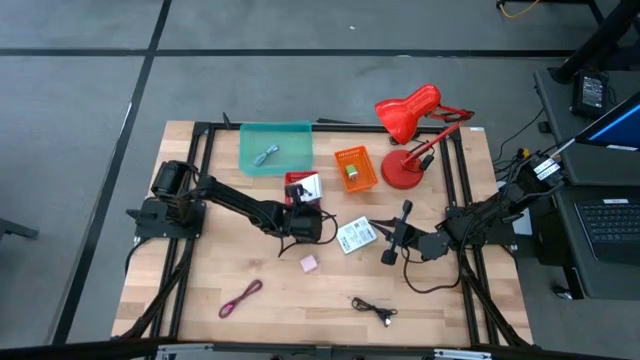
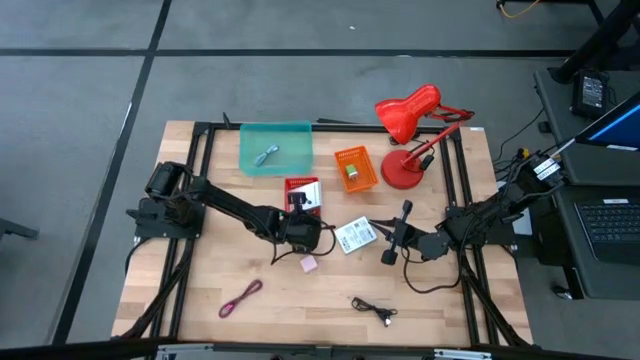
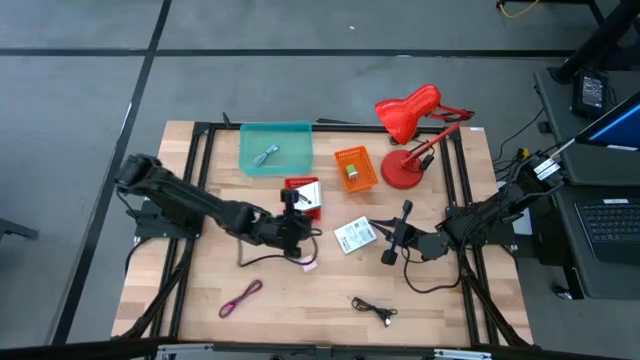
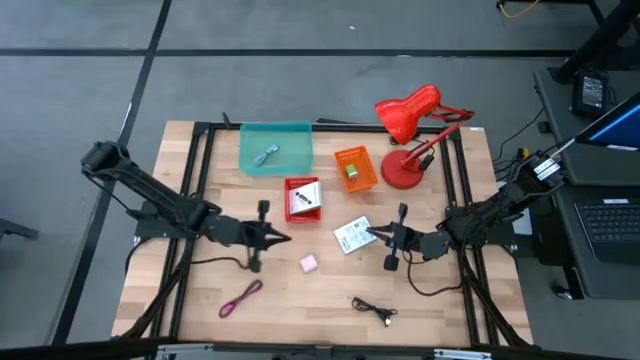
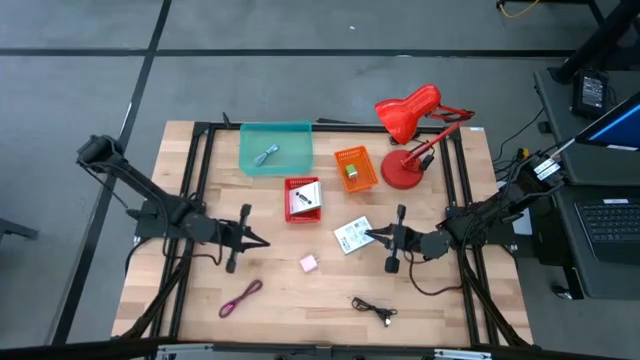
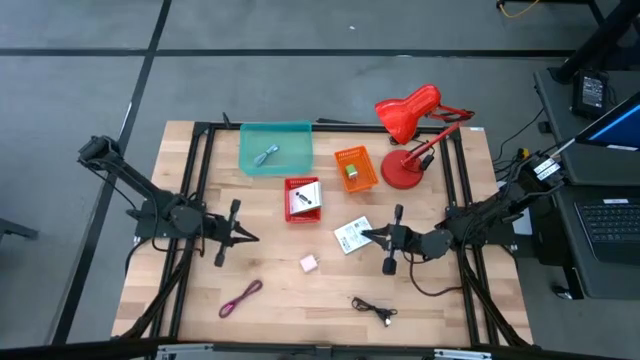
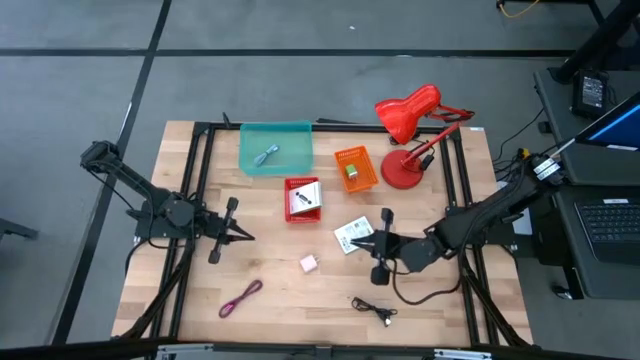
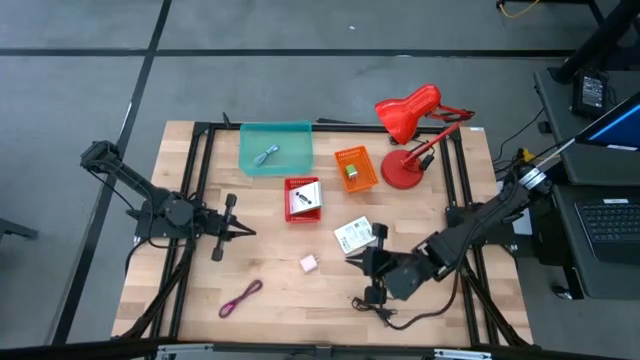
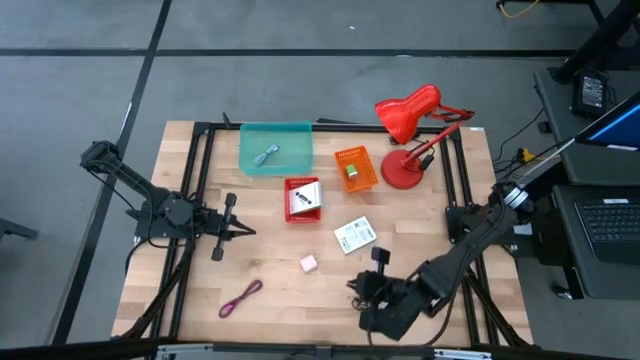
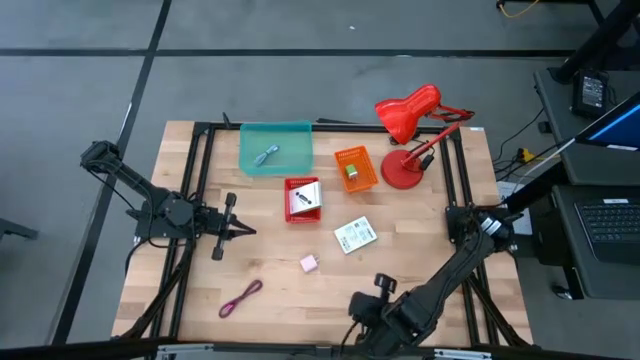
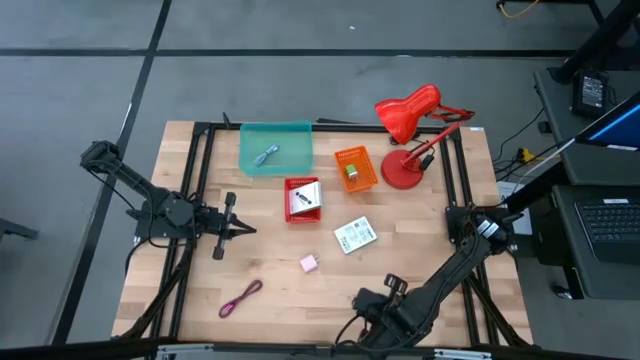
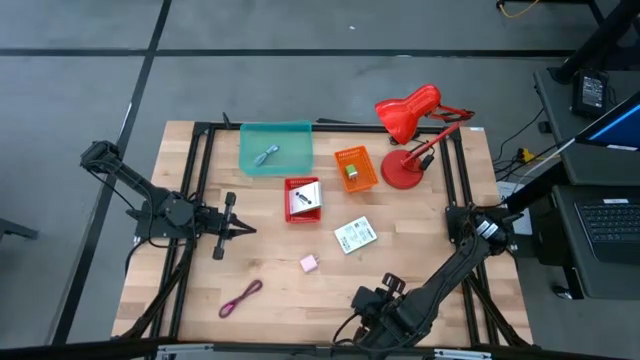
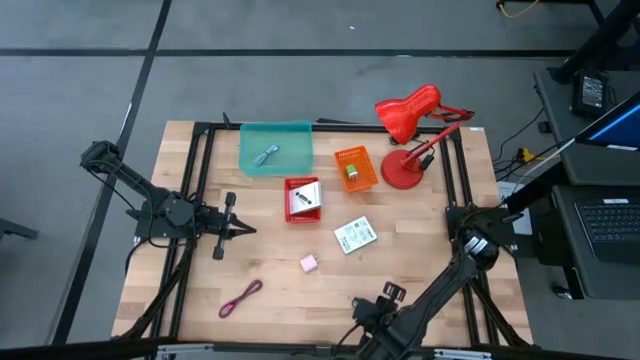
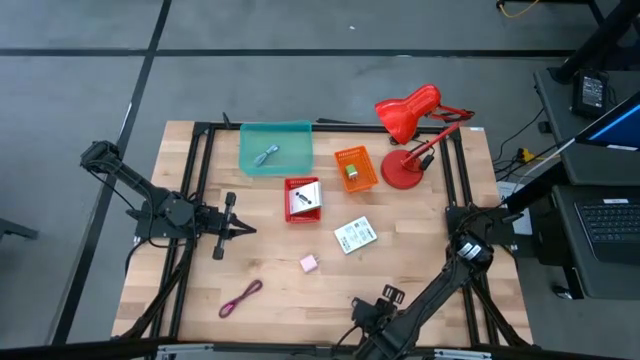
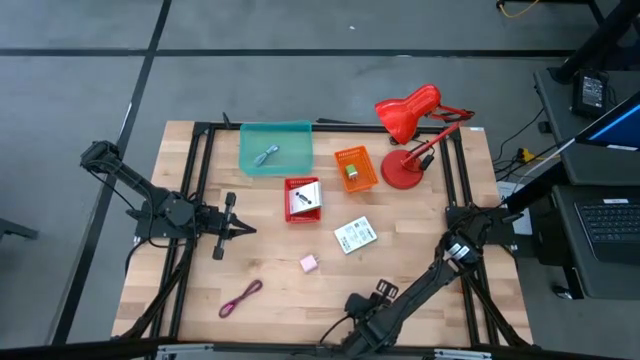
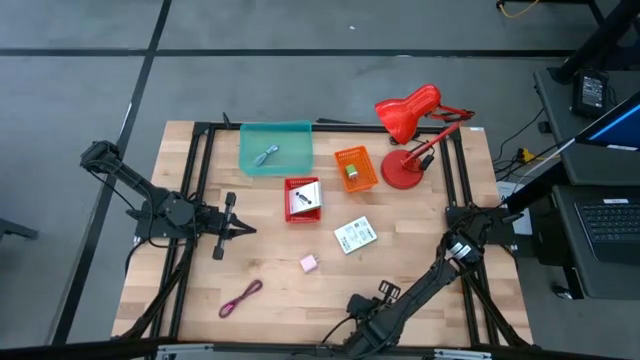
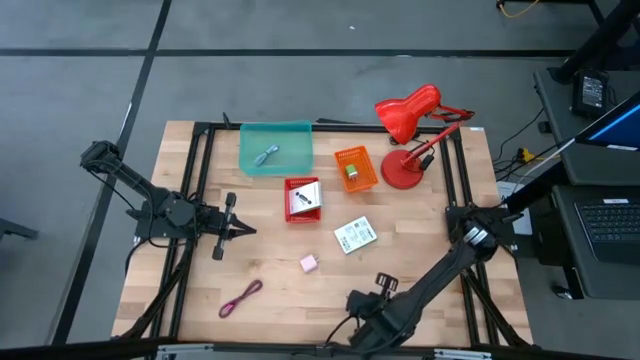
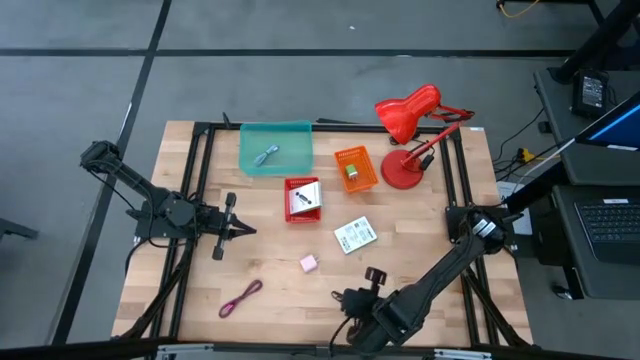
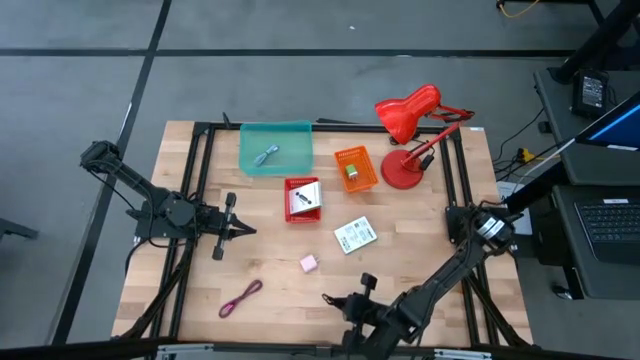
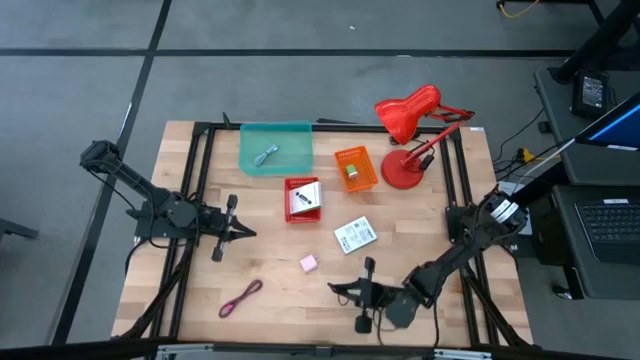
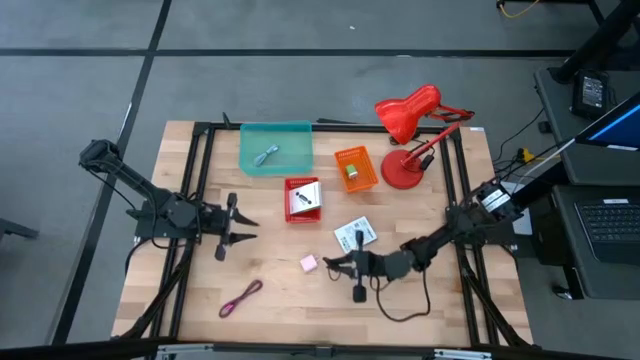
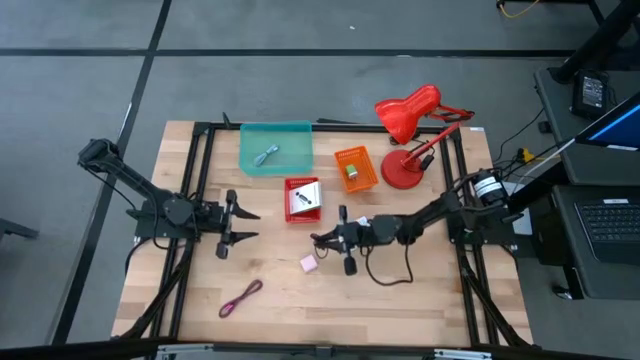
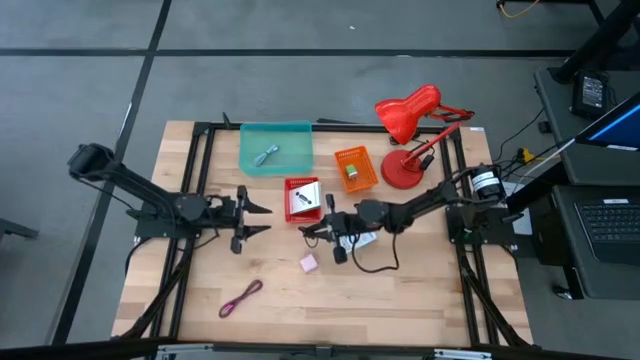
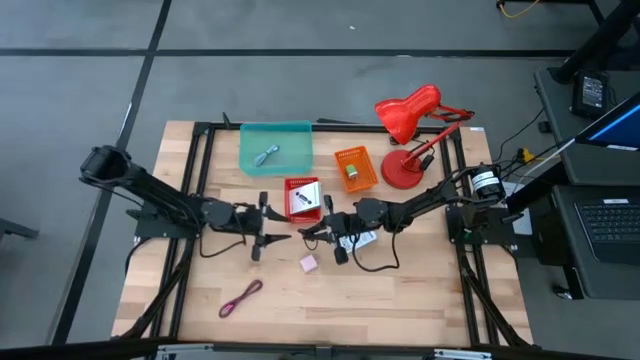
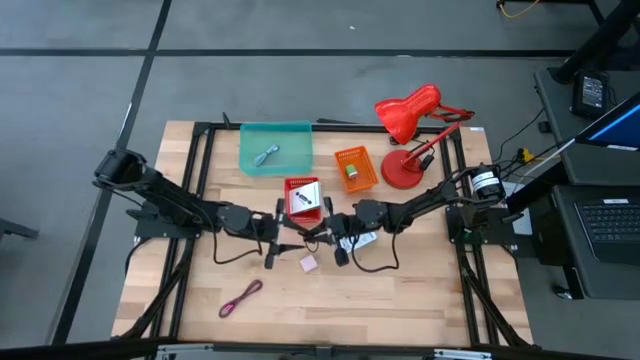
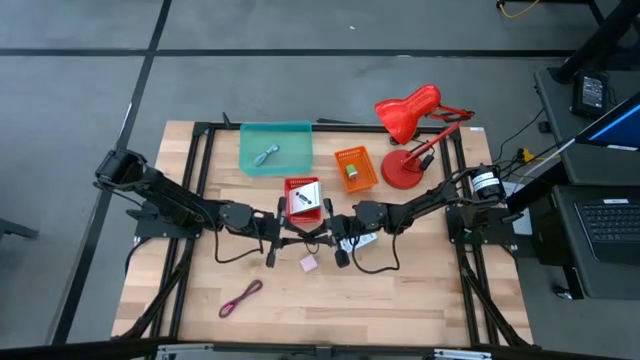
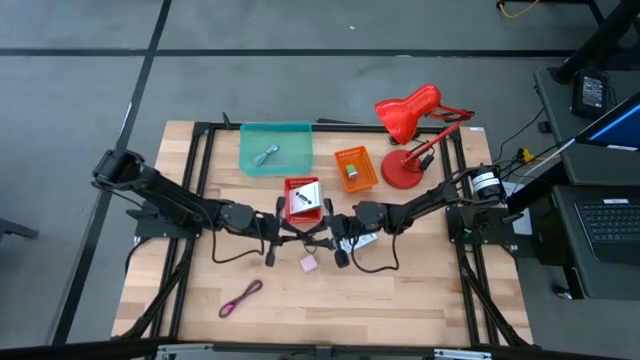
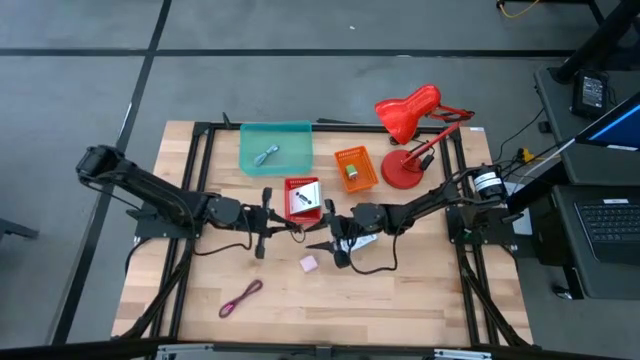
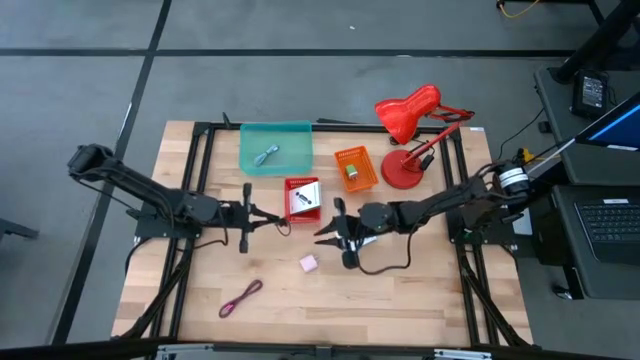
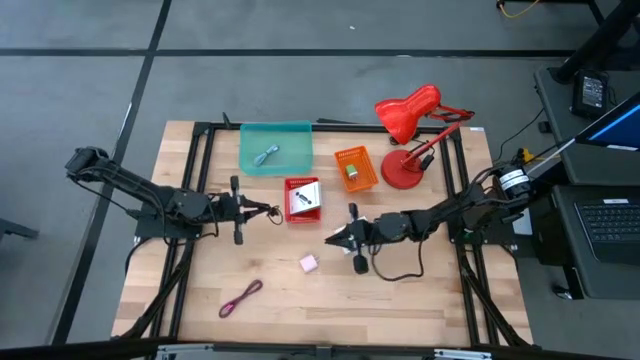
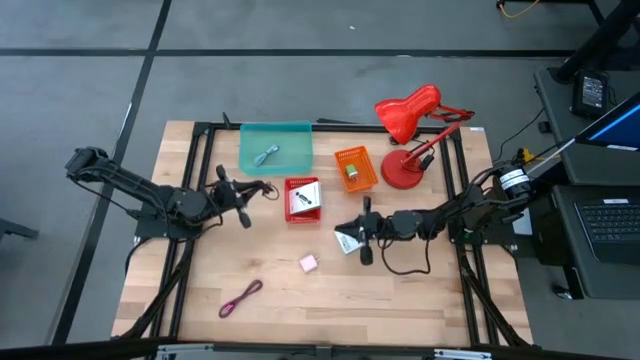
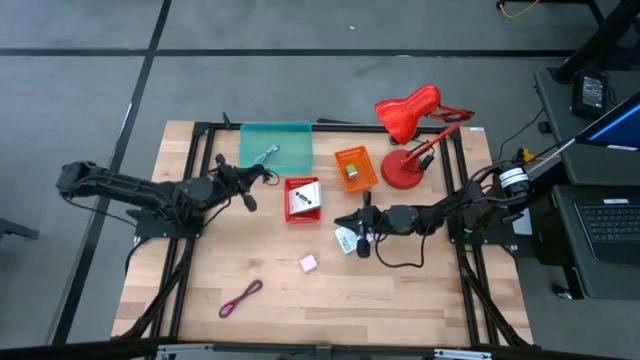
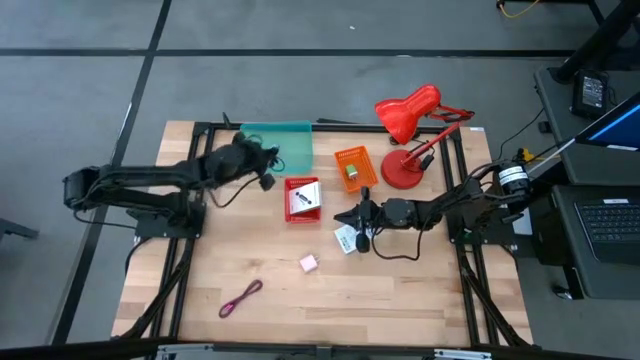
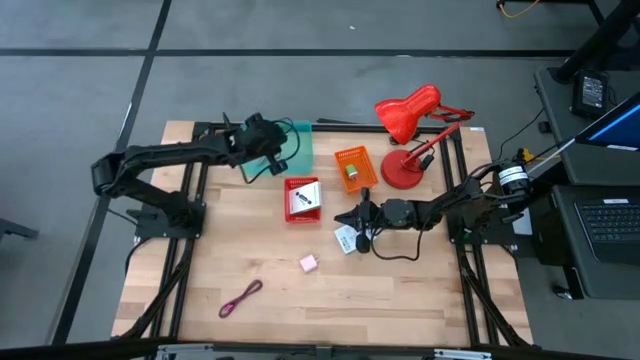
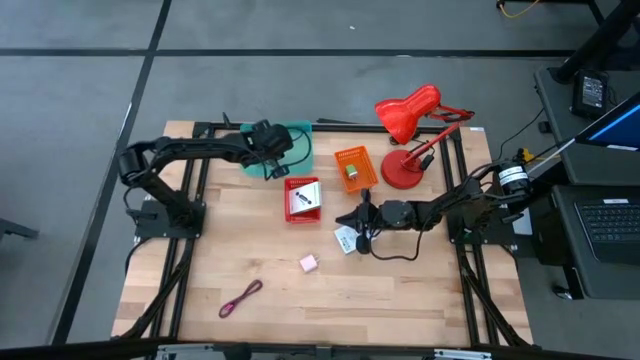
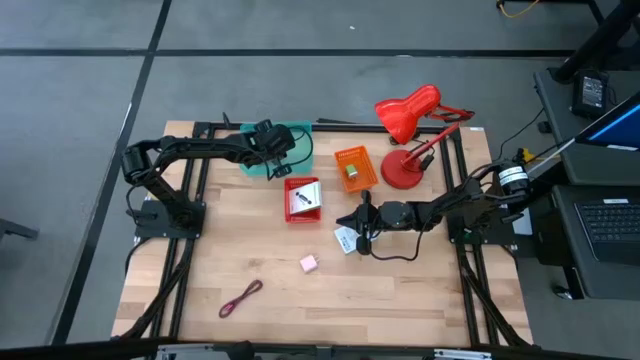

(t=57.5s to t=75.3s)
Task: Pick and place items into bin
Put the black charger cable into the blue bin

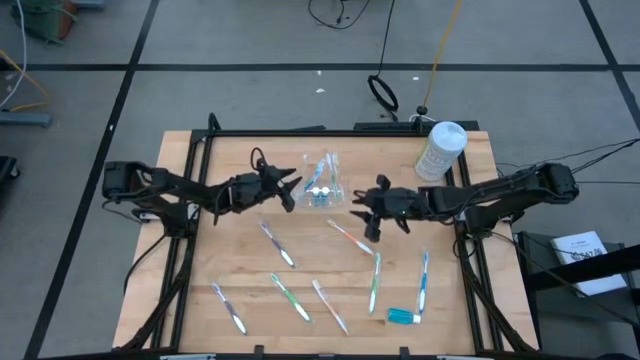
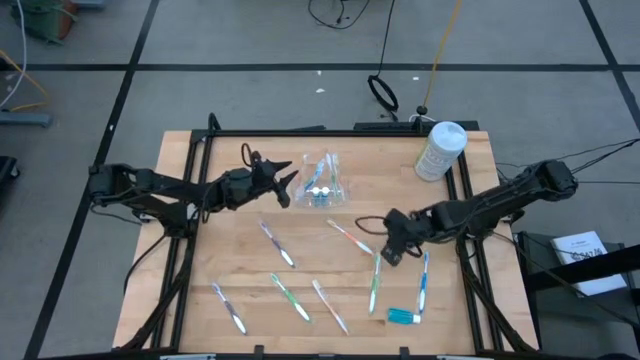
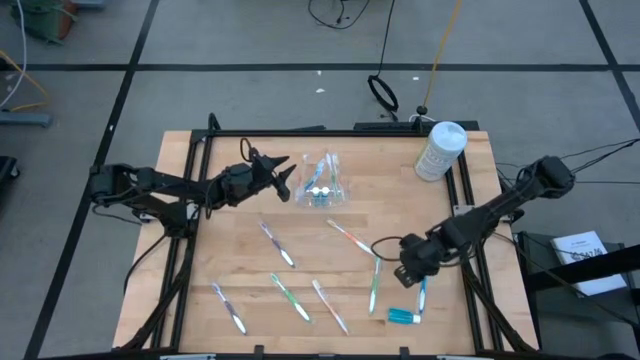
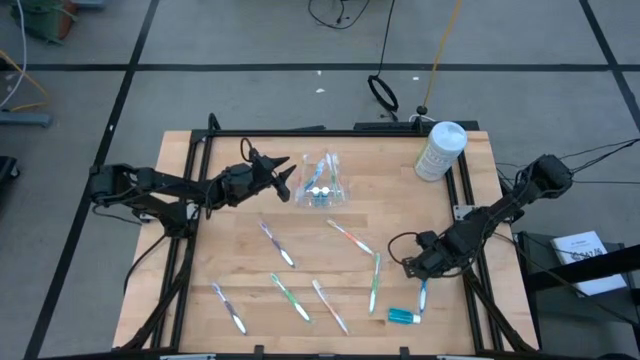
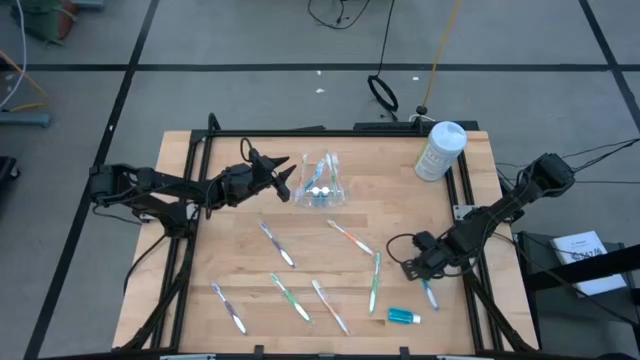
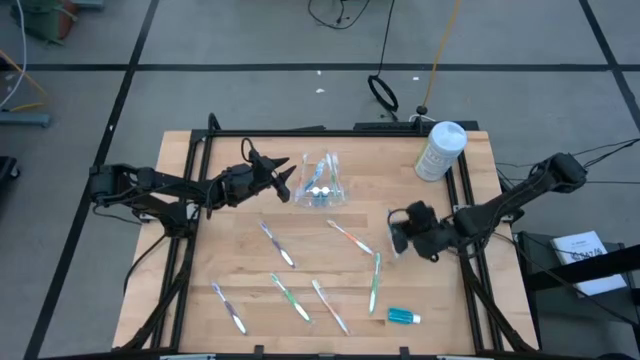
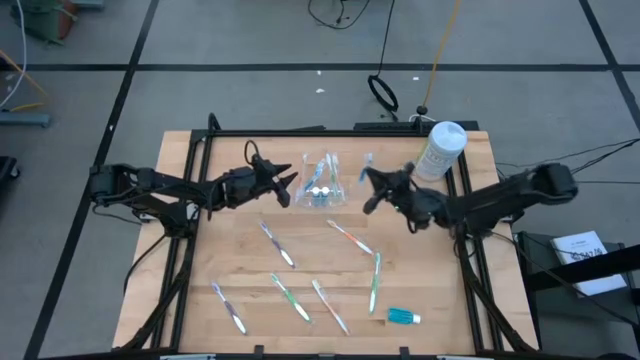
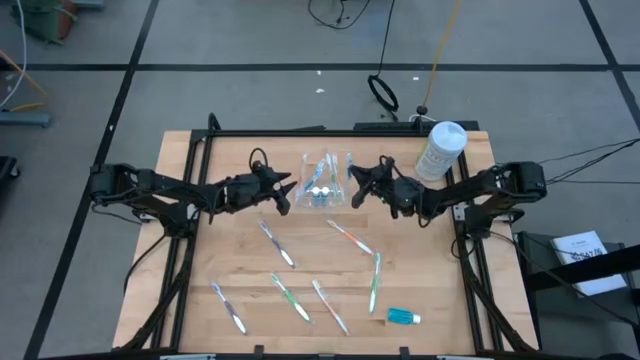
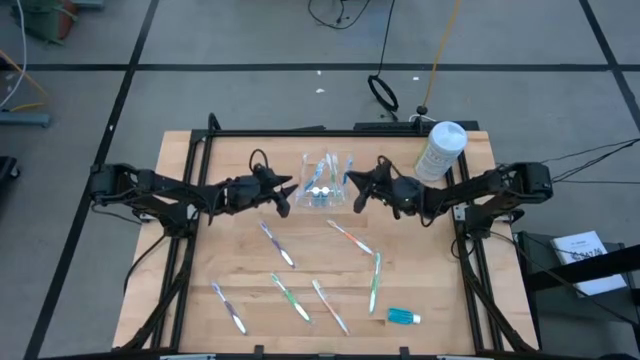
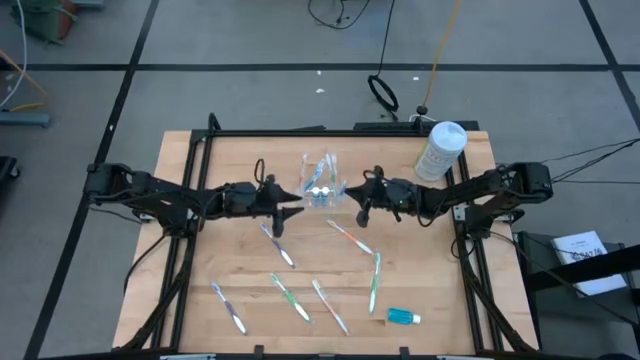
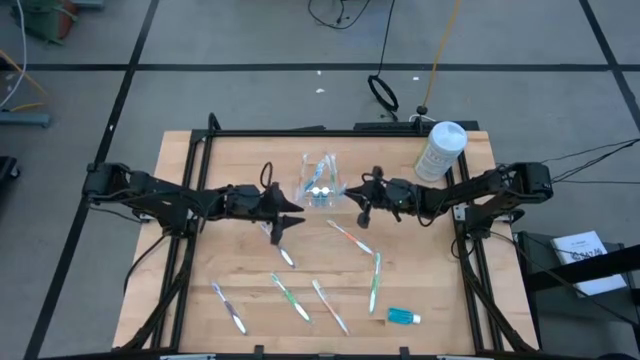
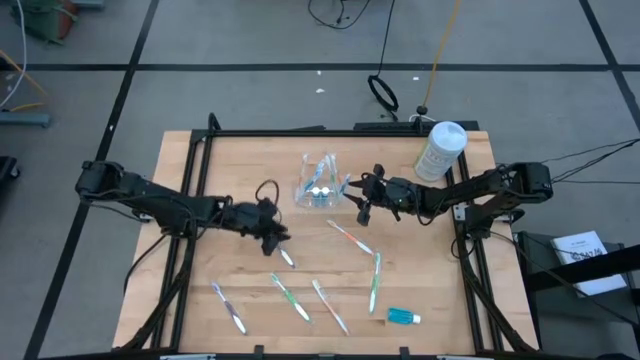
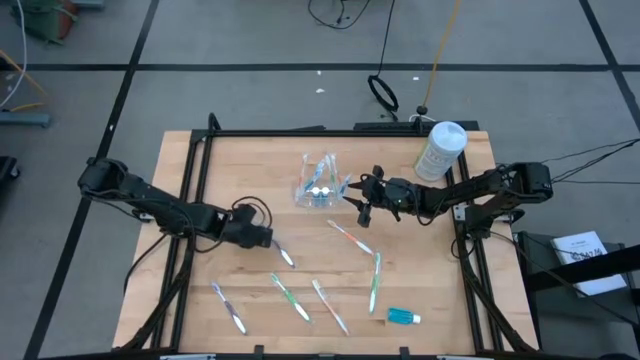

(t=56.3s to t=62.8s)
Task: Pick & Place Toothbrushes
Put the blue toothbrush into the transparent organizer
